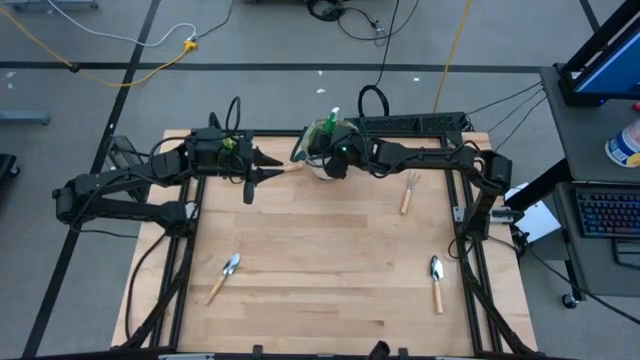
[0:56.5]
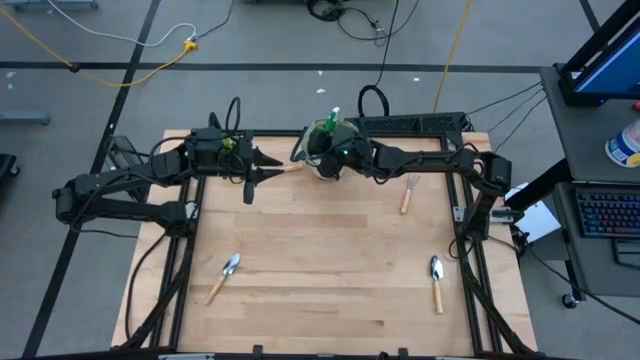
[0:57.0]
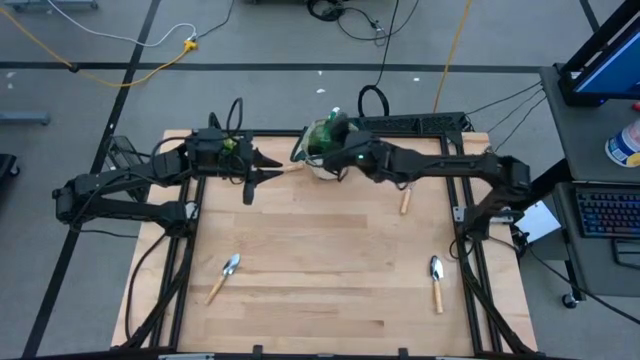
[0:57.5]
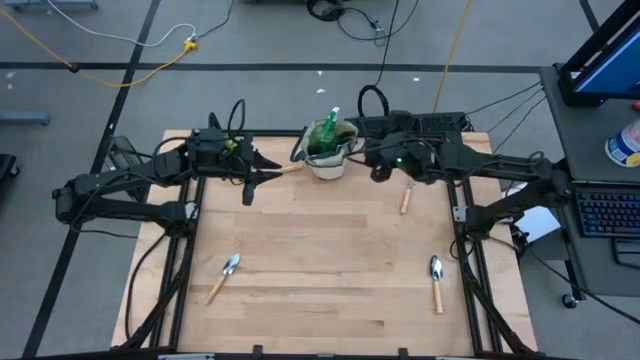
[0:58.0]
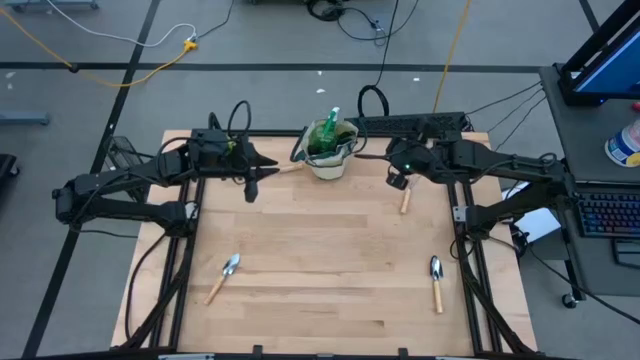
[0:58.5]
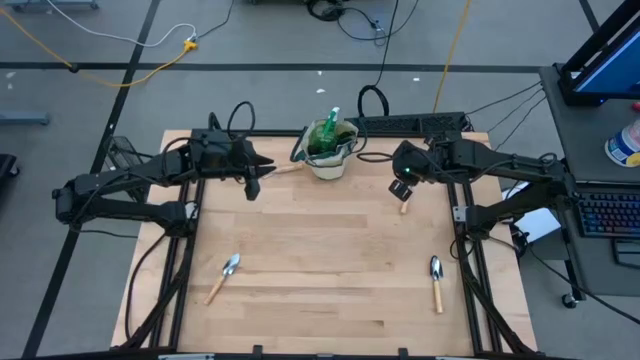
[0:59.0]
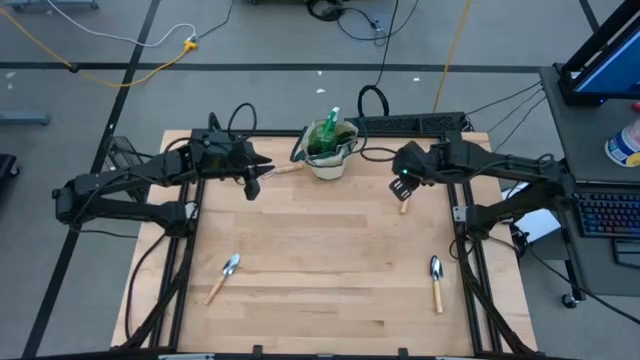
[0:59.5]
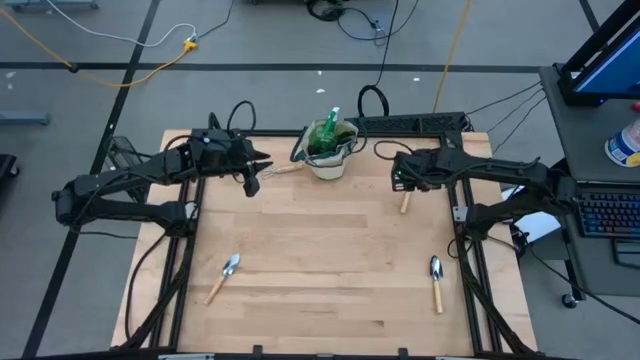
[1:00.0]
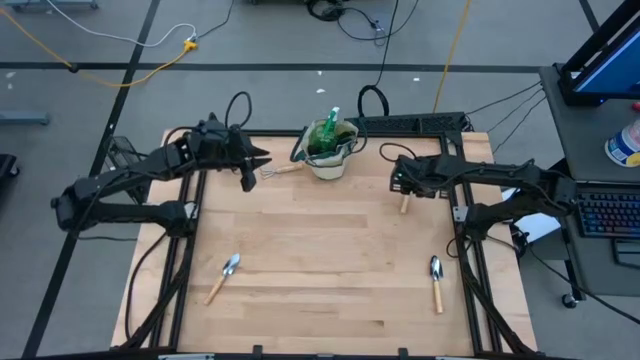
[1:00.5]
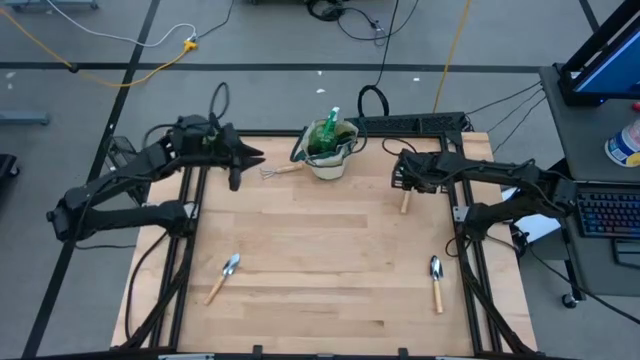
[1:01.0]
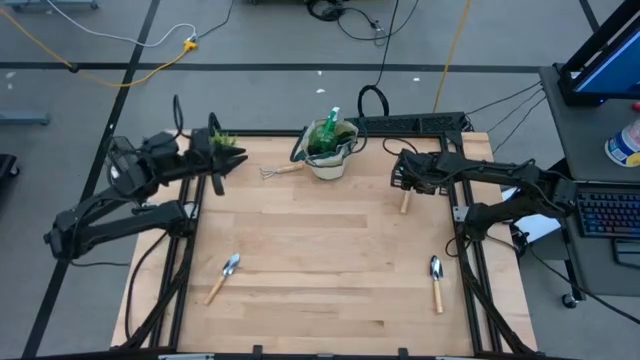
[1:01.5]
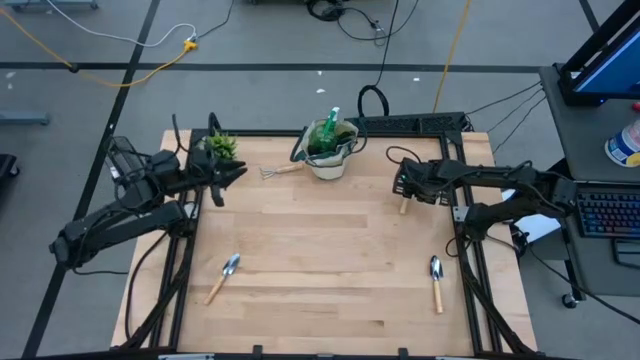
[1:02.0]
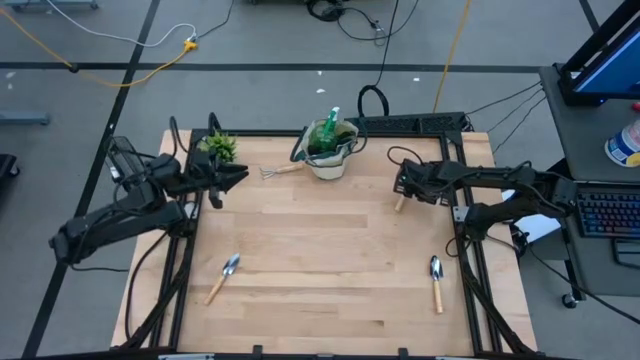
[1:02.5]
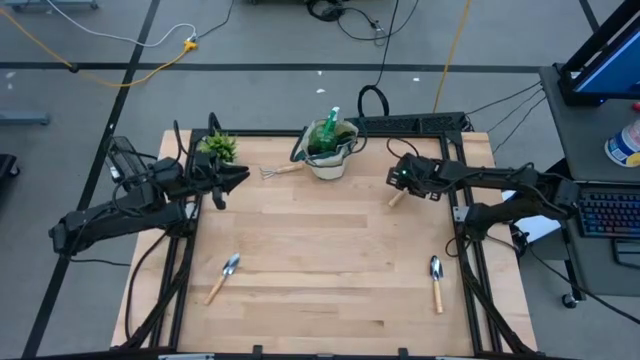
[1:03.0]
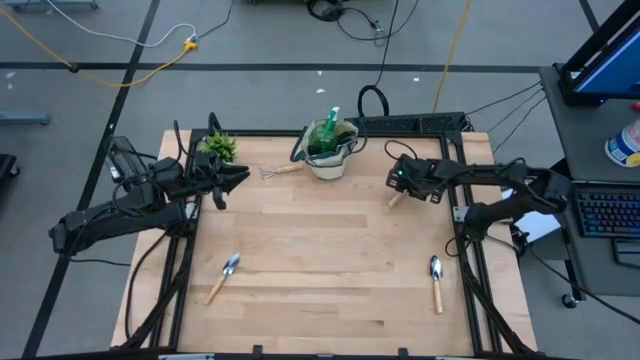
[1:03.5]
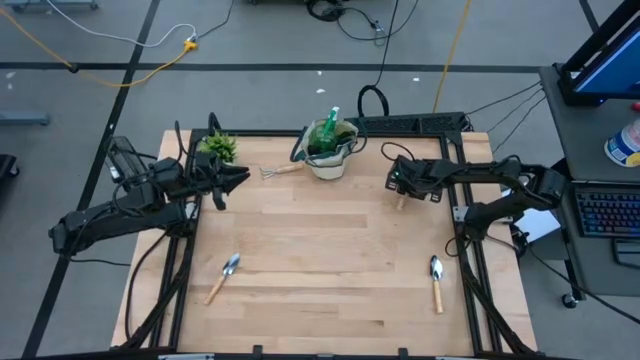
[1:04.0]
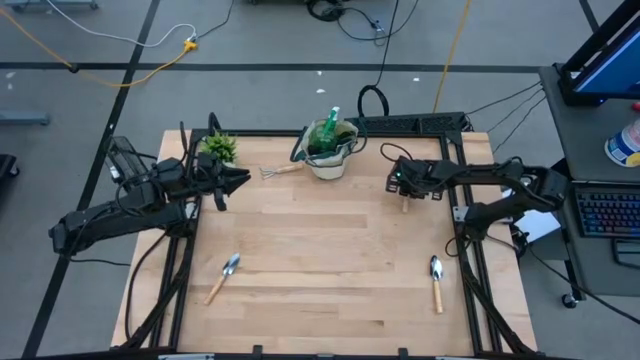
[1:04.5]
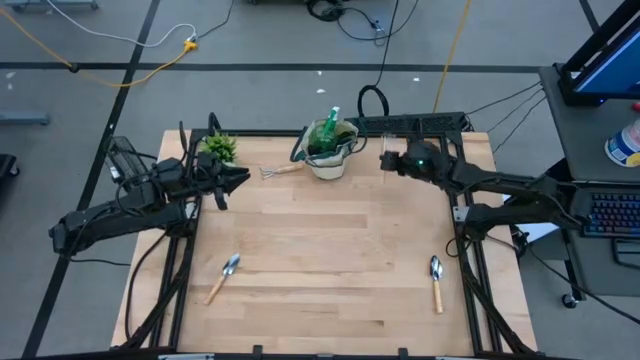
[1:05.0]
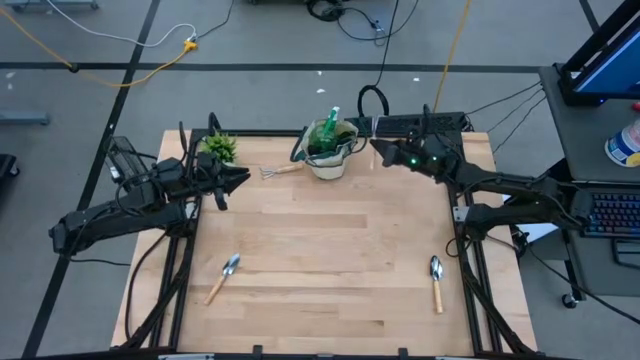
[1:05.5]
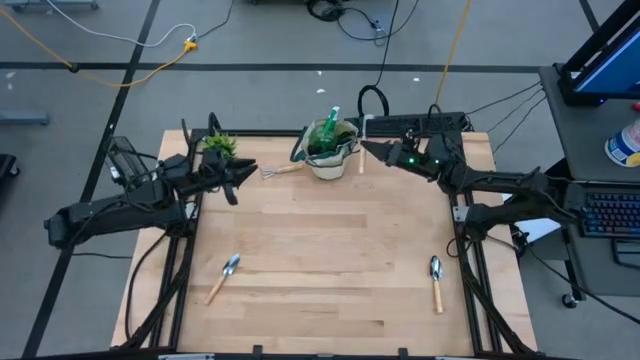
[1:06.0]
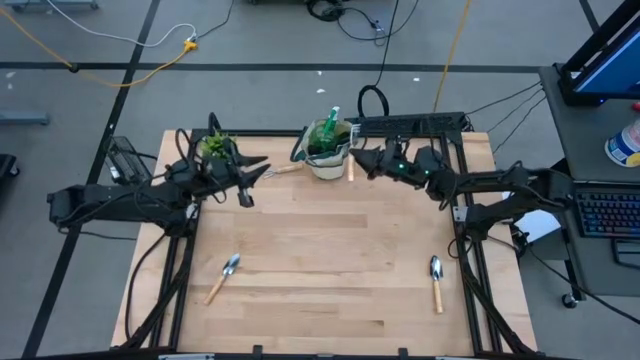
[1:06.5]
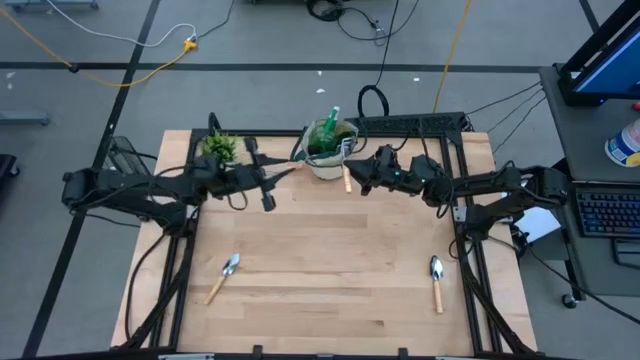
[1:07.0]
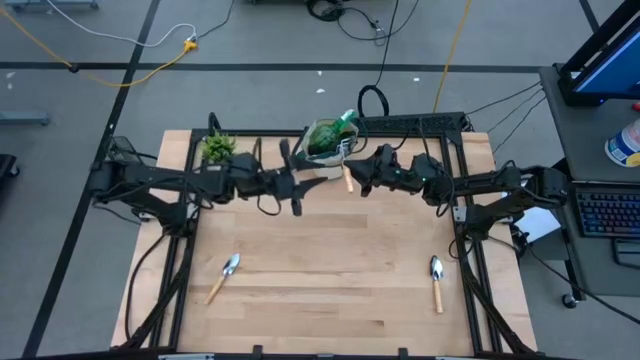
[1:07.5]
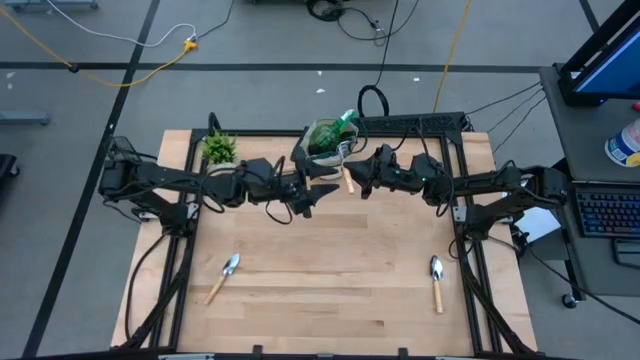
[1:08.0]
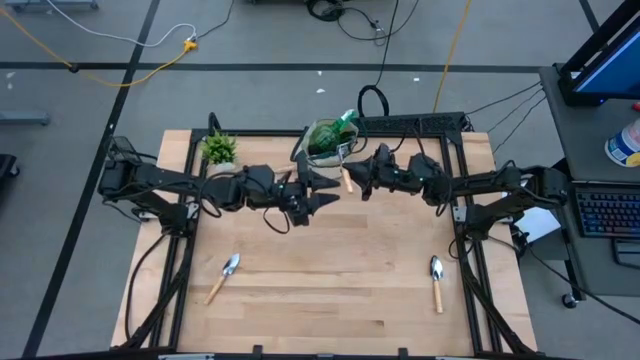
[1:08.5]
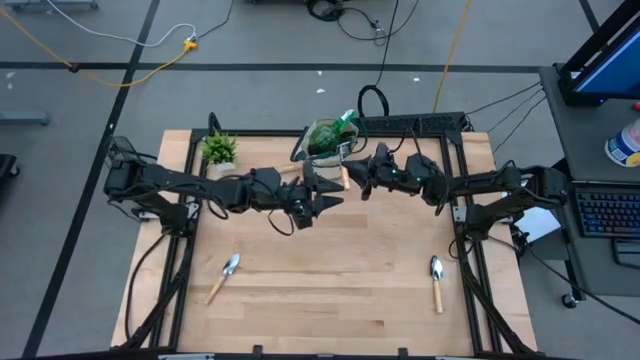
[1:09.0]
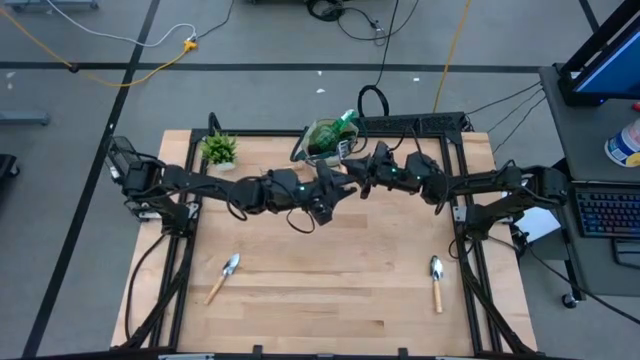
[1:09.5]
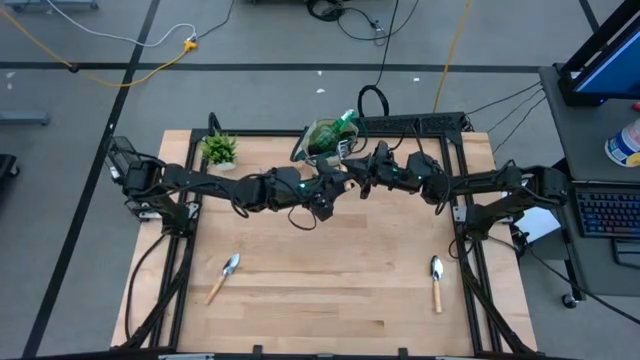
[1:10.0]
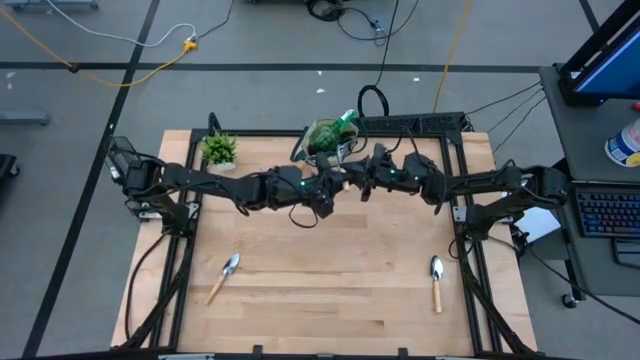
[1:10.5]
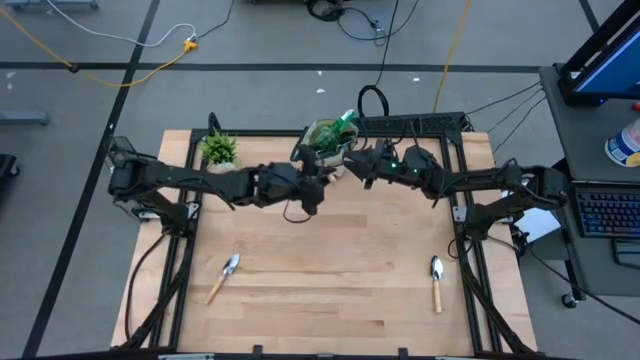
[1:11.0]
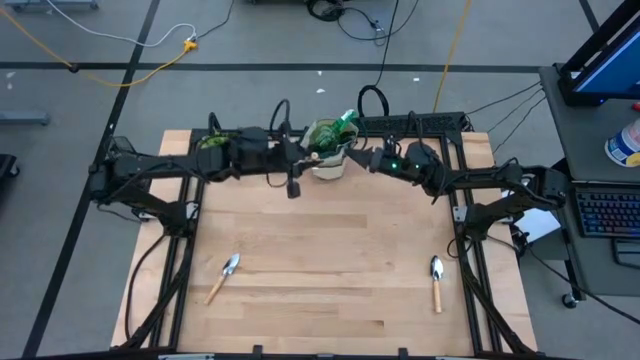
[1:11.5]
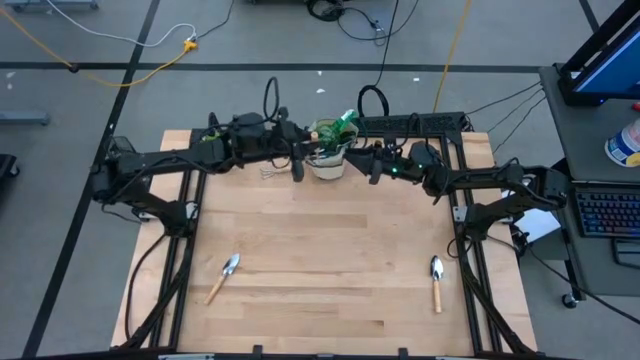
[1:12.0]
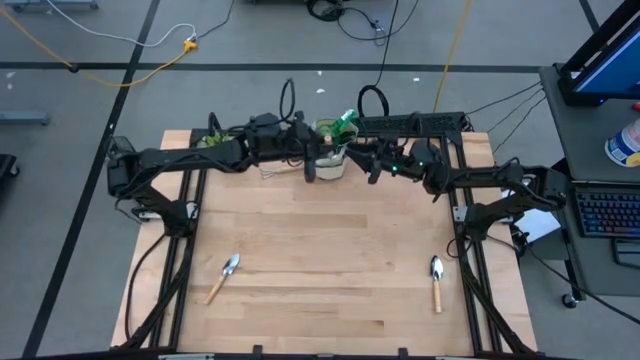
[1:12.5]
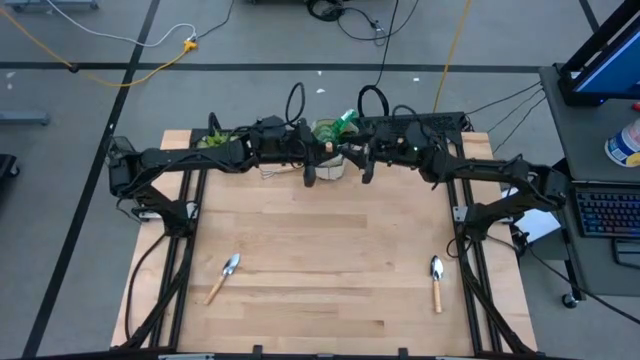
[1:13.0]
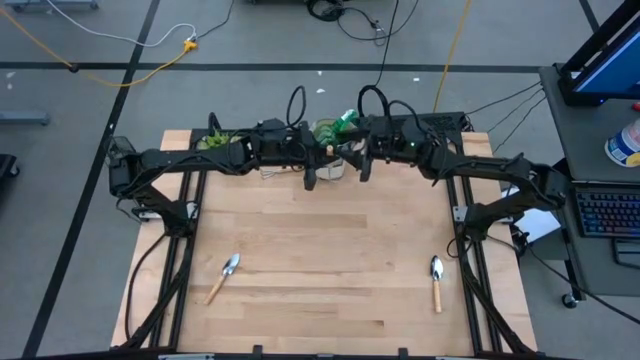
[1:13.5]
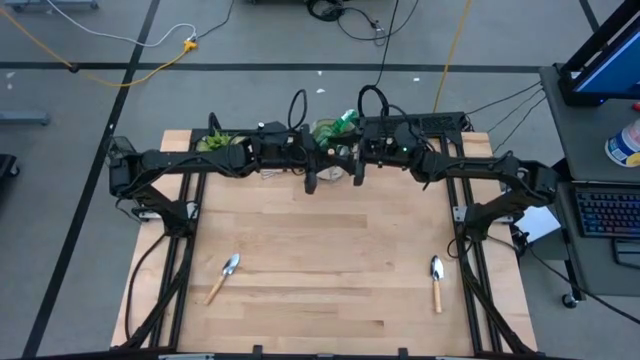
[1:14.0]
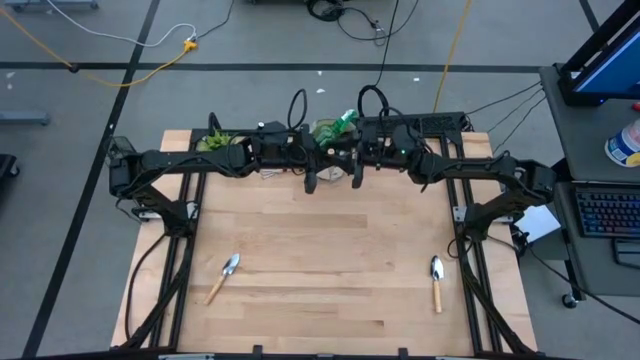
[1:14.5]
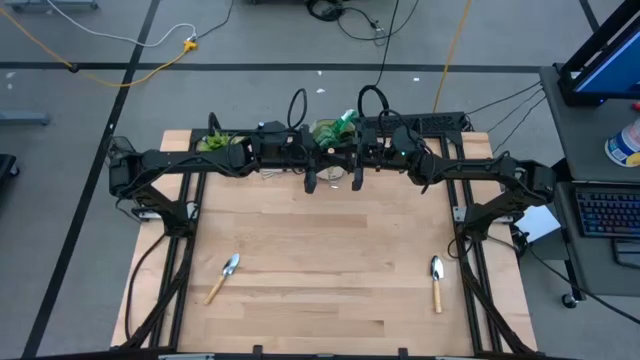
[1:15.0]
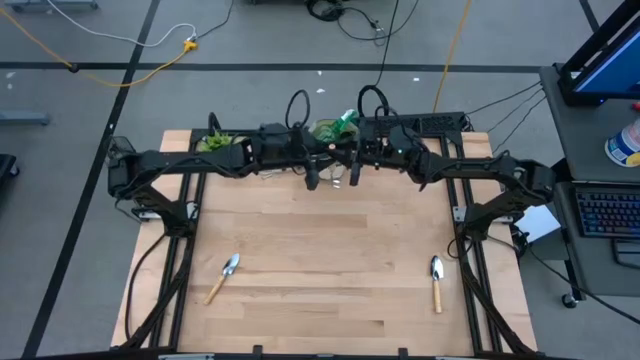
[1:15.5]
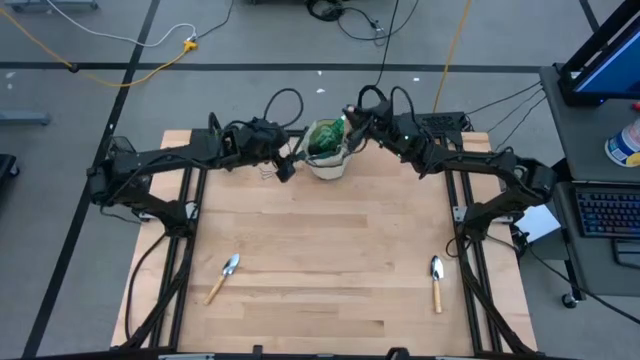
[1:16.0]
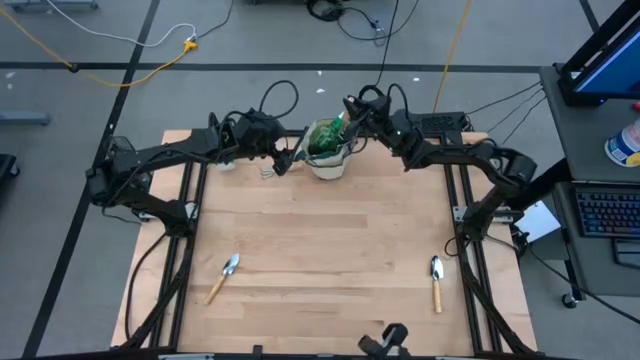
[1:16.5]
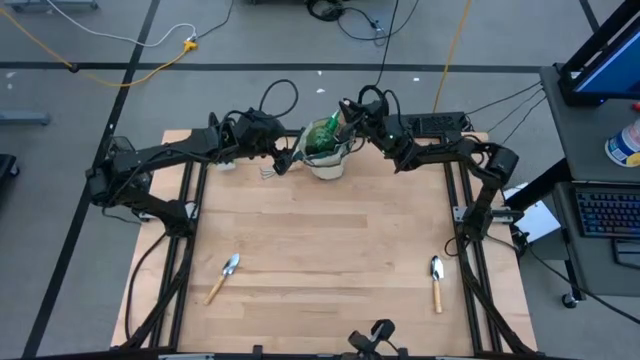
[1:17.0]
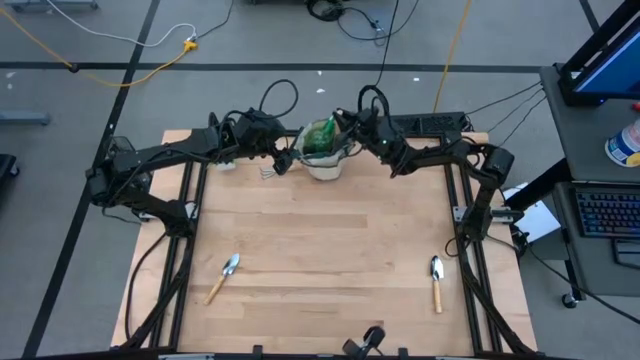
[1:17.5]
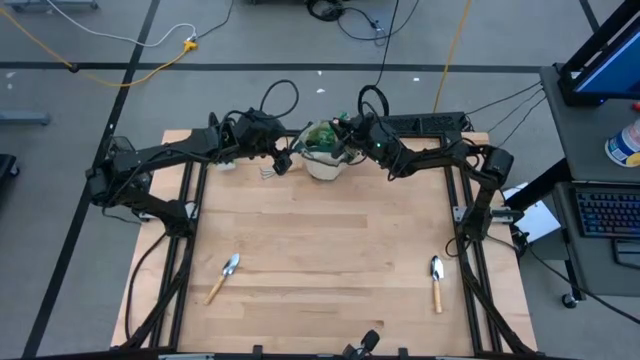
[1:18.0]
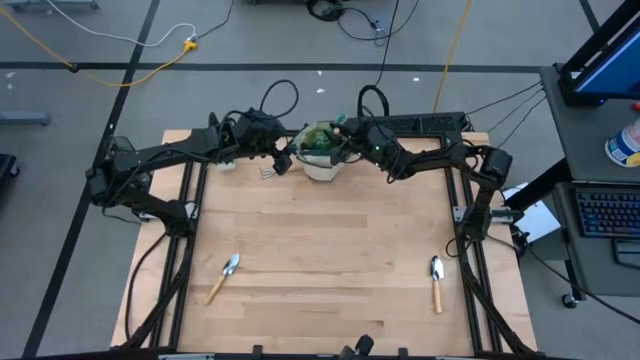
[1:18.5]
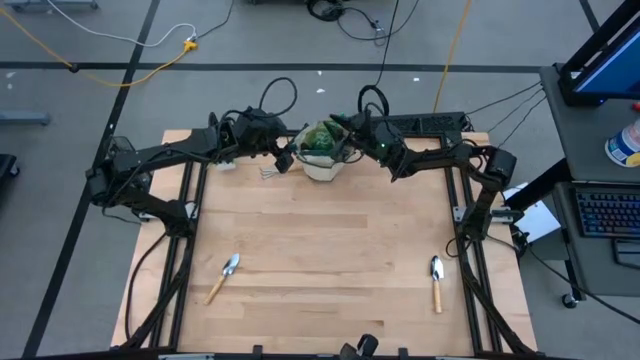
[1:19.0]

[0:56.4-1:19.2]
Task: Pick & Place Garden tools in Gardening bag
Put the brown hand rake into the green gardening bag
